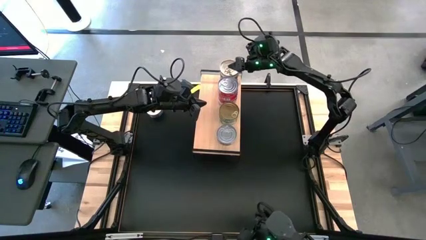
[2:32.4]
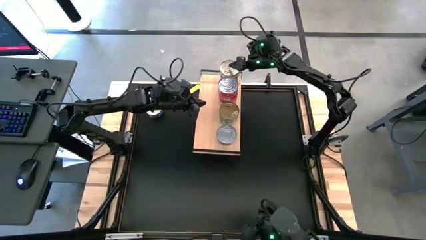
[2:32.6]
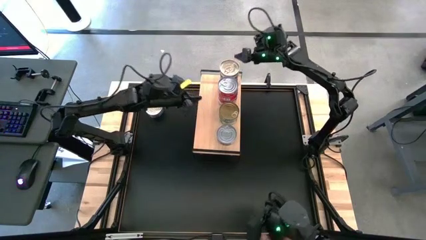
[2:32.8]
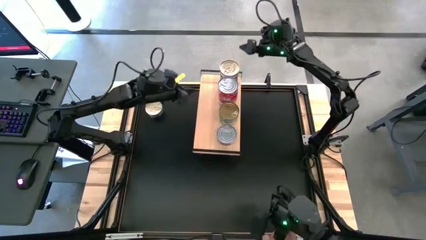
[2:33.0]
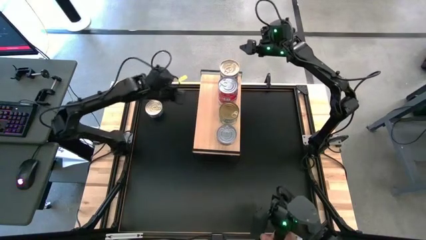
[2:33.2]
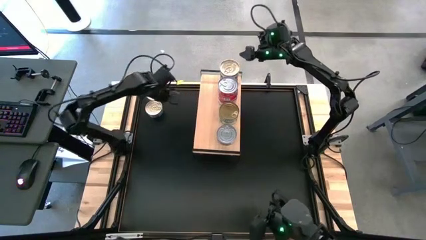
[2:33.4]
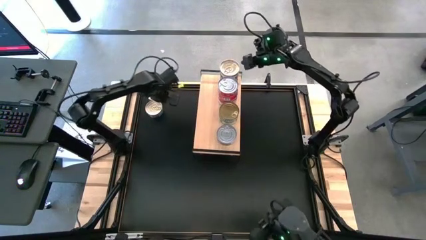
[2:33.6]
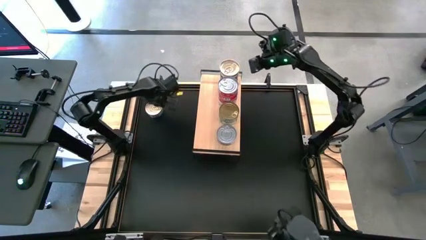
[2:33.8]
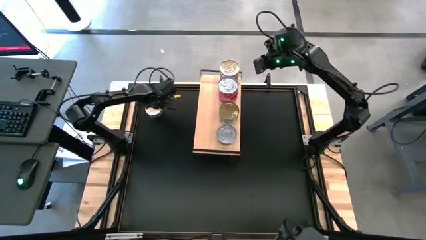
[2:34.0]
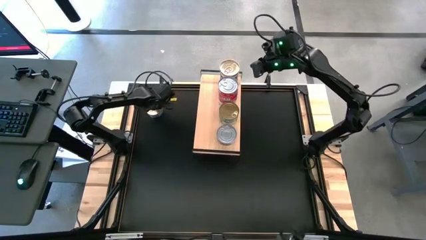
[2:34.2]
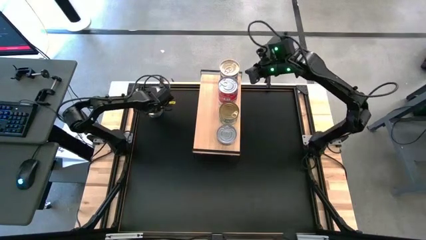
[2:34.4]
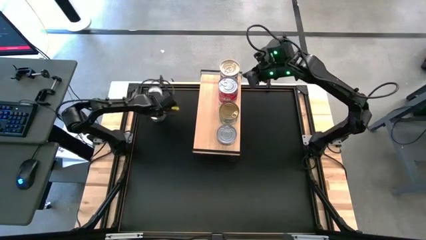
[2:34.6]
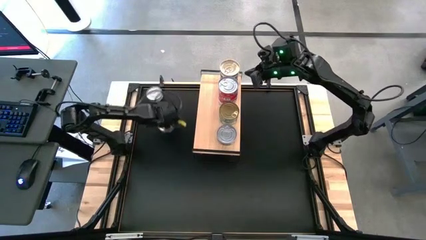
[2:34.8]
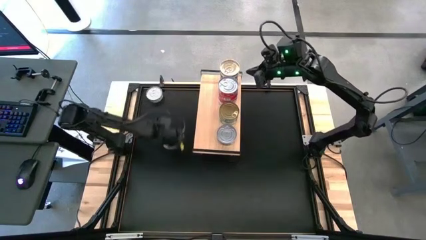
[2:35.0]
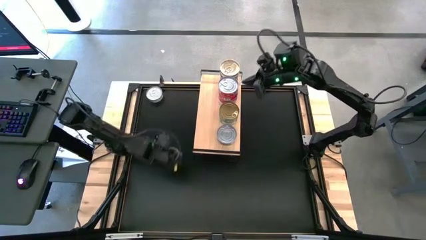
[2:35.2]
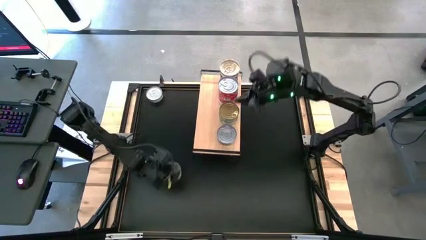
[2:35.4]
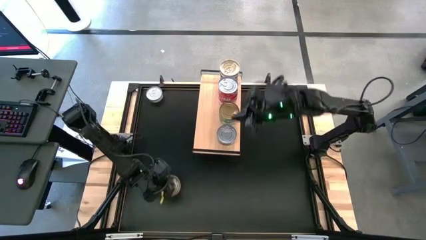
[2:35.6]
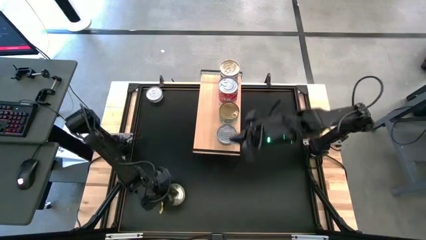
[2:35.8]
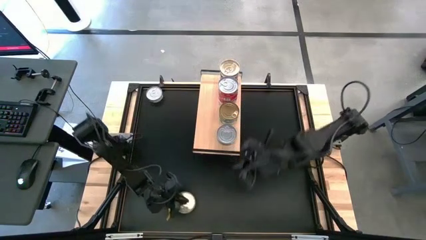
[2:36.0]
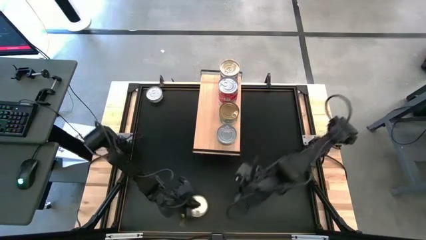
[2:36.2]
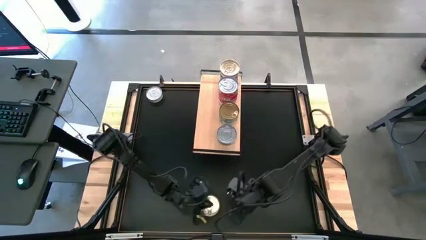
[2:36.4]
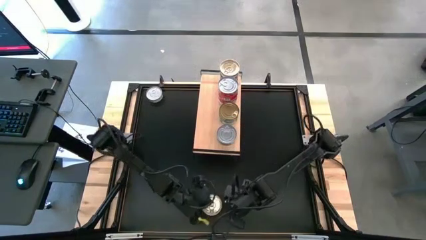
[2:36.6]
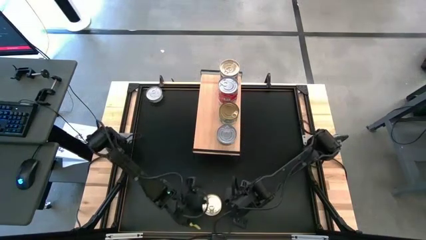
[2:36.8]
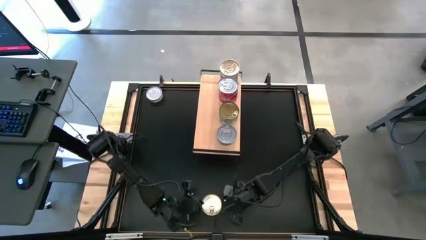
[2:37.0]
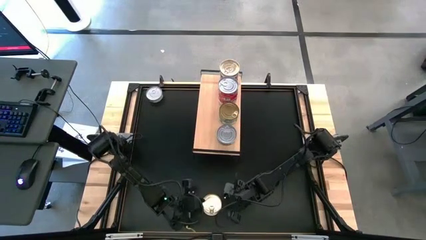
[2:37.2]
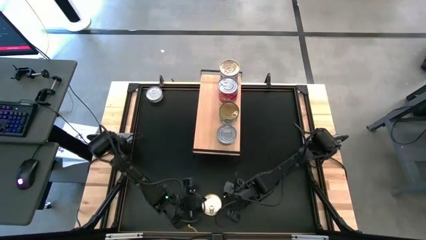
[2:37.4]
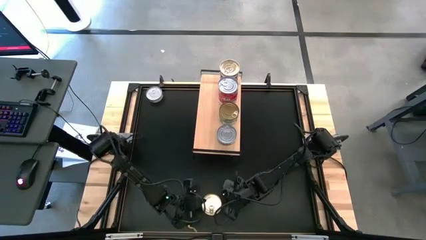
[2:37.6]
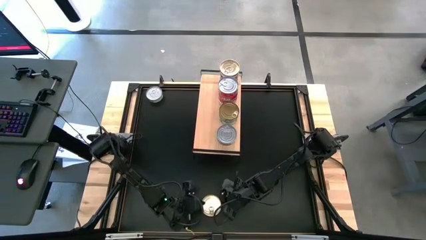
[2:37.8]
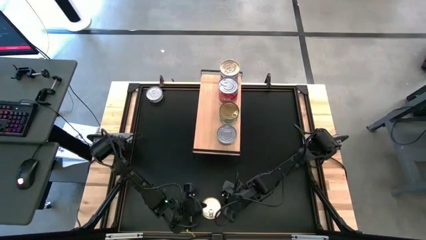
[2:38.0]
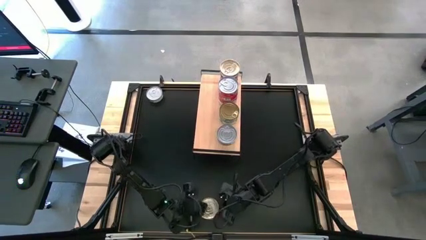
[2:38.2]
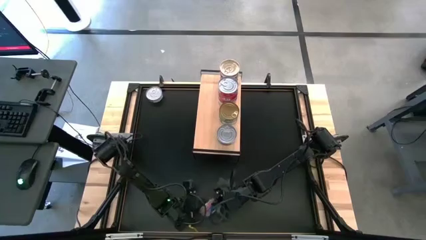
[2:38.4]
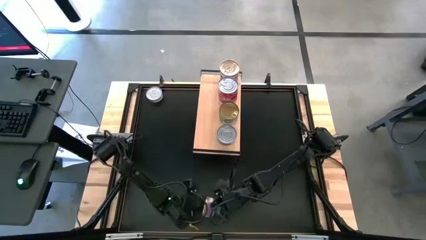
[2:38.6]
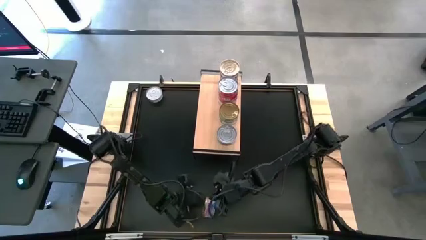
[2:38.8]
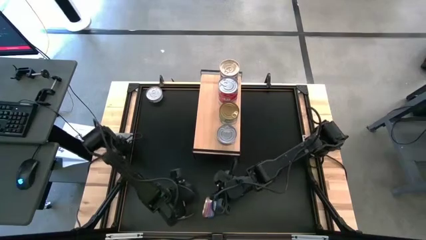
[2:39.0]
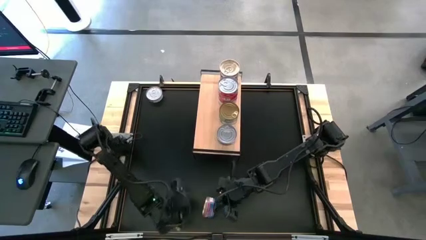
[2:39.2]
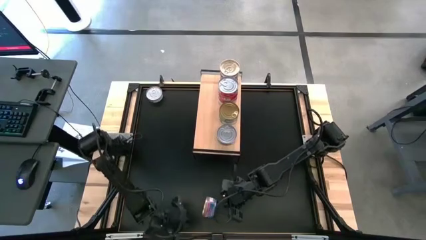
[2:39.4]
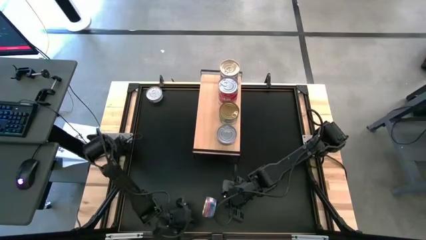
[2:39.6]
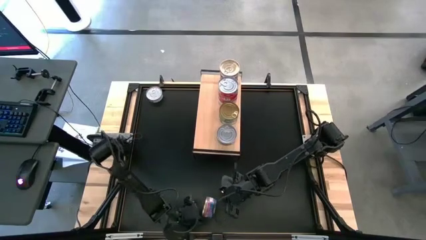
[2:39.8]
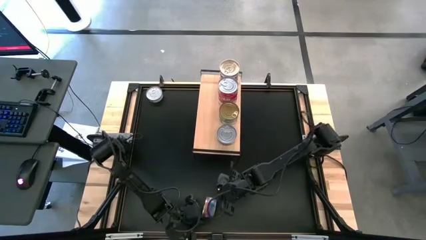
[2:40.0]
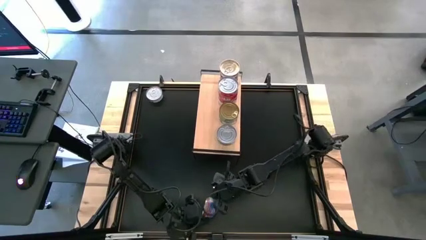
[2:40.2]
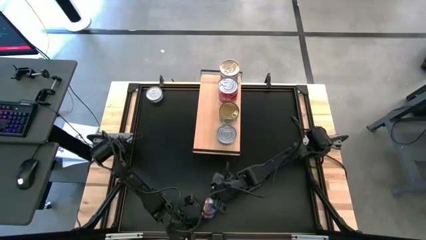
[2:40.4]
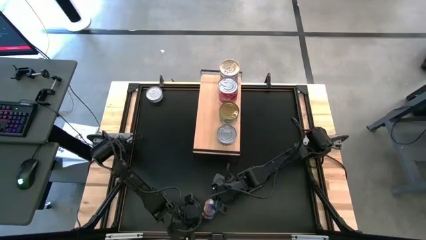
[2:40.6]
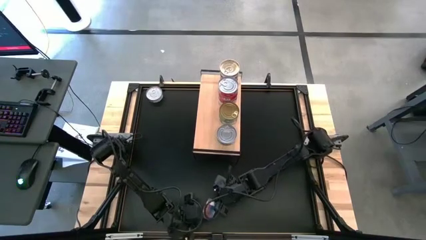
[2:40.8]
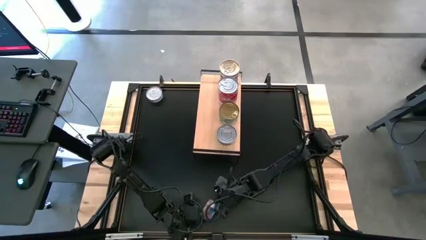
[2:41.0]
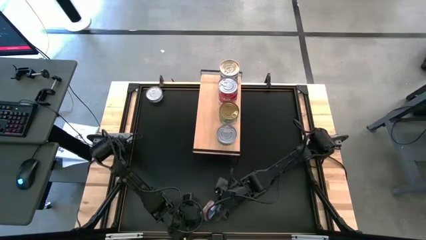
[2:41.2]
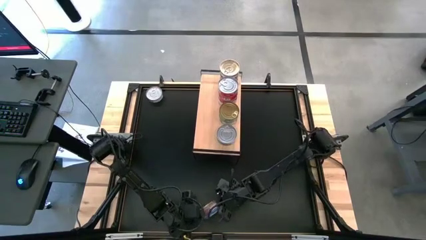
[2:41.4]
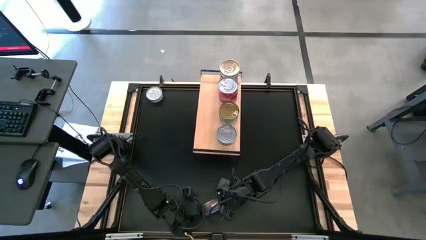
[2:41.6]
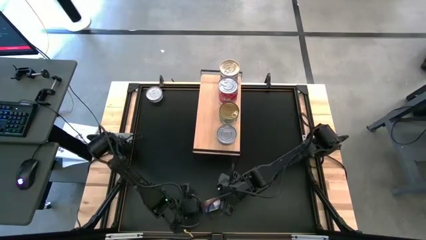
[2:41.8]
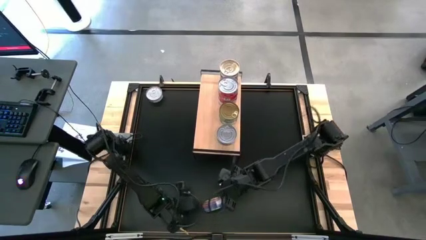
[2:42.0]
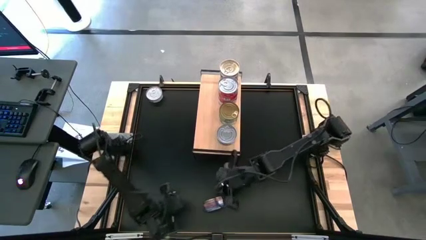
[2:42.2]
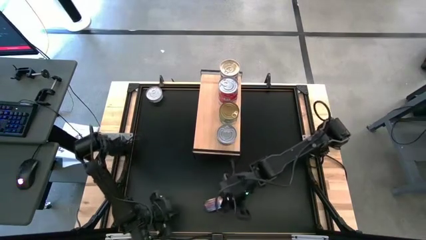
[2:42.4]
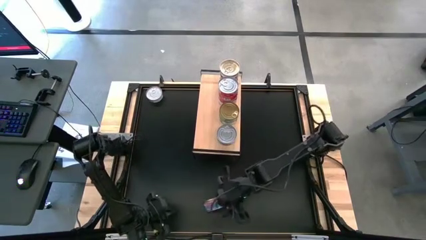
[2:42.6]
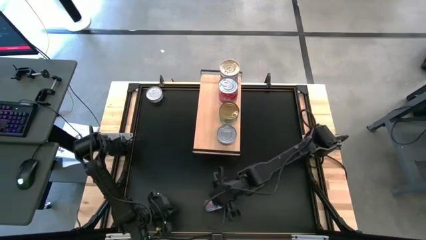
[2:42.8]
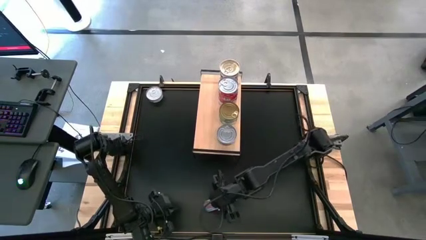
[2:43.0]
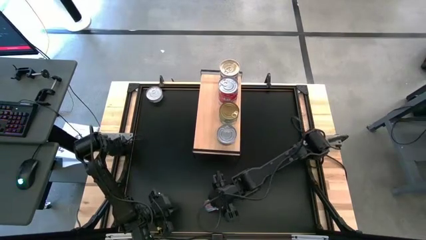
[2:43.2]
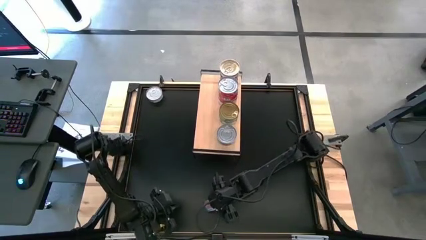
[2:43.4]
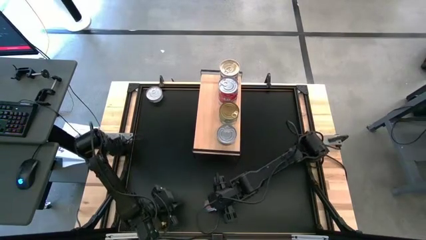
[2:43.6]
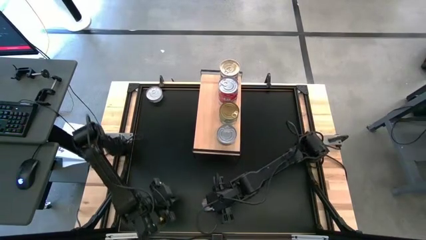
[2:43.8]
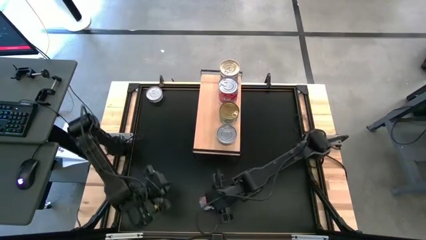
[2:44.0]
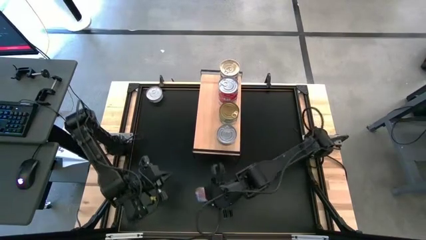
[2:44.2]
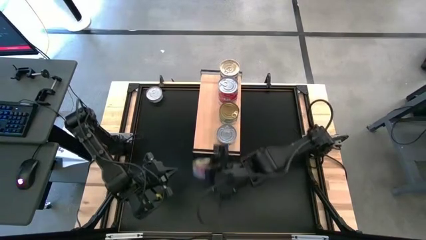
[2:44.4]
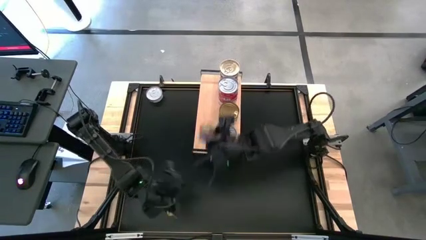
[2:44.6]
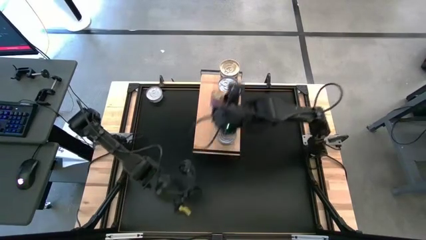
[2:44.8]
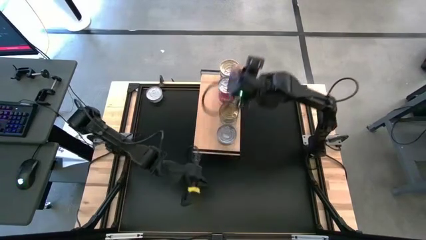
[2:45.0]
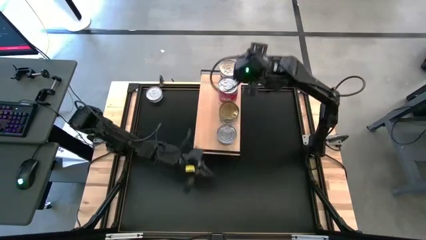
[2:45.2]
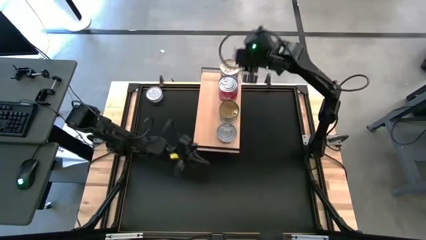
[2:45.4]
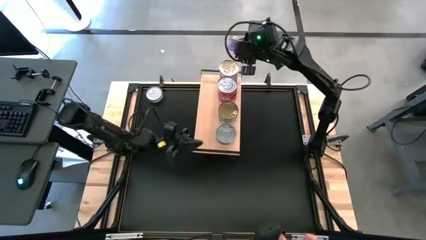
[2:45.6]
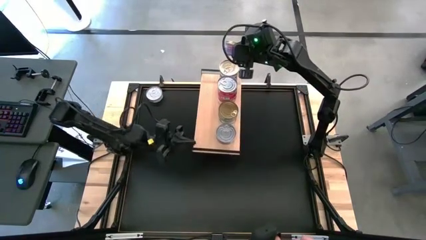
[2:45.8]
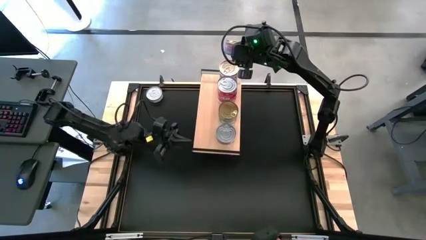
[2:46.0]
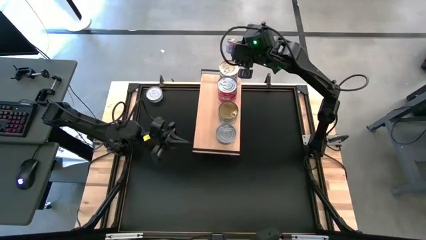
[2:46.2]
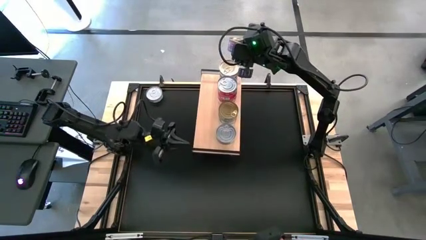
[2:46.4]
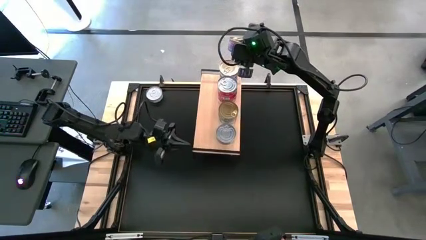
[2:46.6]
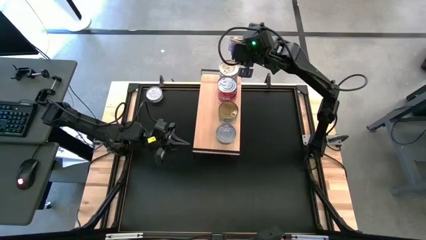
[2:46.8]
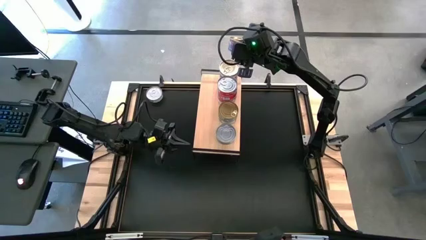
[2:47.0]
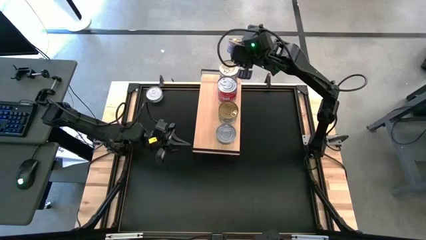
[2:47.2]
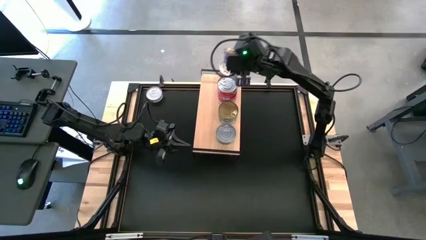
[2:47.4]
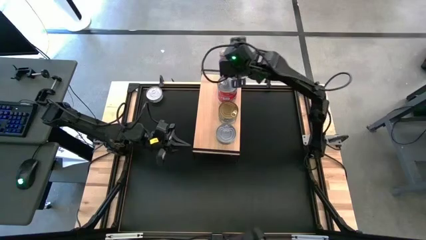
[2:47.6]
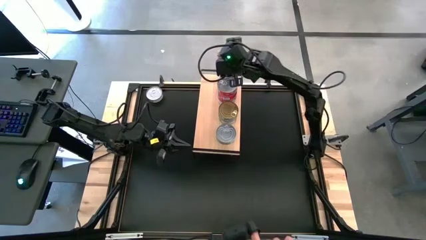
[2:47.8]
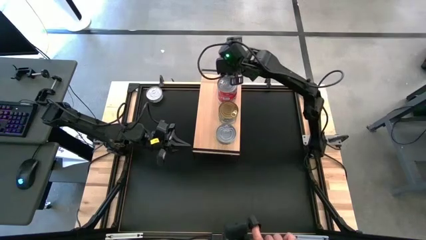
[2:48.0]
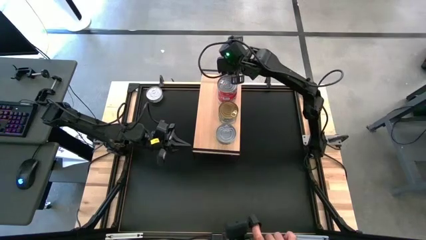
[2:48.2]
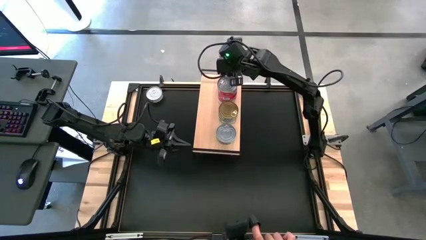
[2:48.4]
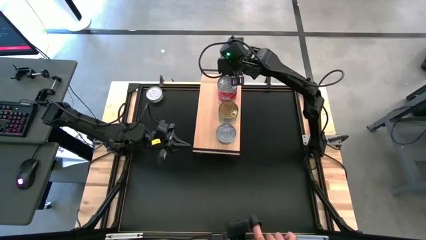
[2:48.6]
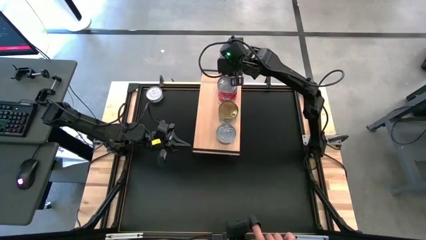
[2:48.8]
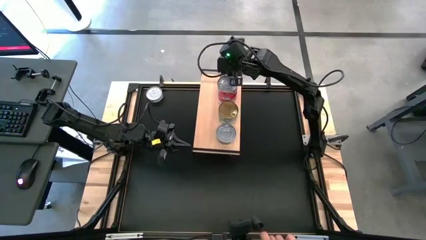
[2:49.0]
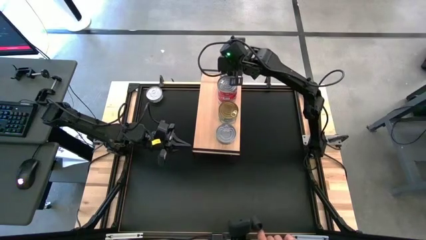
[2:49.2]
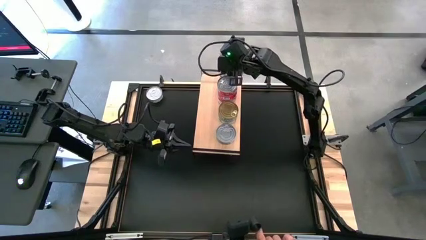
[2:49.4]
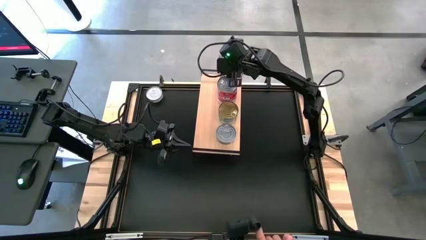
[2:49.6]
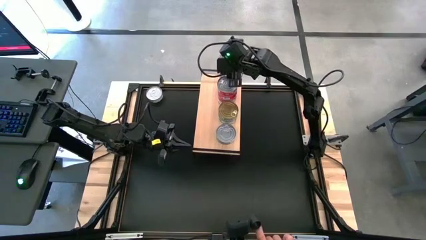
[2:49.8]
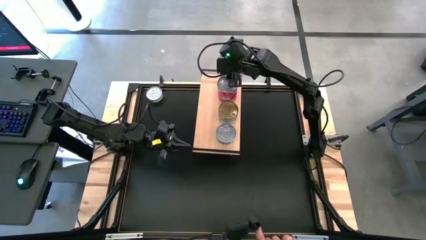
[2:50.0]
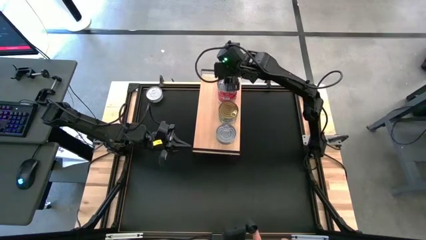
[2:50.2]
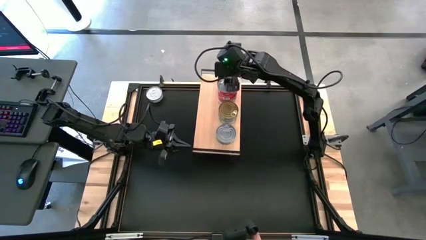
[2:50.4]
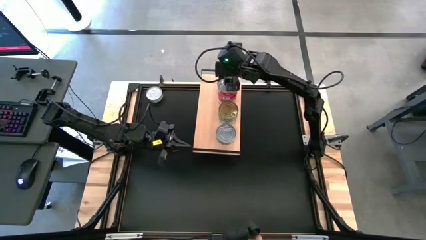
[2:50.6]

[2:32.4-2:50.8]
Task: Stack canned seafood by type on shelf
Stack the blue-pink tuna can on top of the blue-pink tuna can on the shelf
